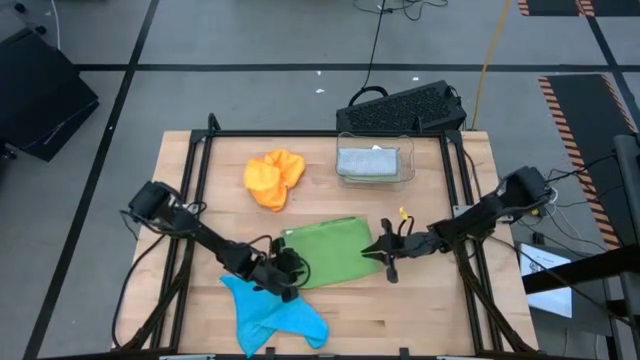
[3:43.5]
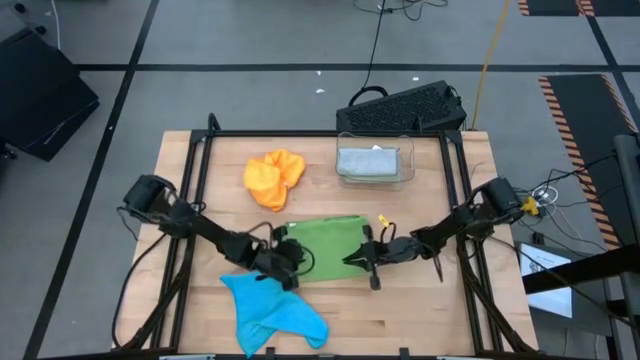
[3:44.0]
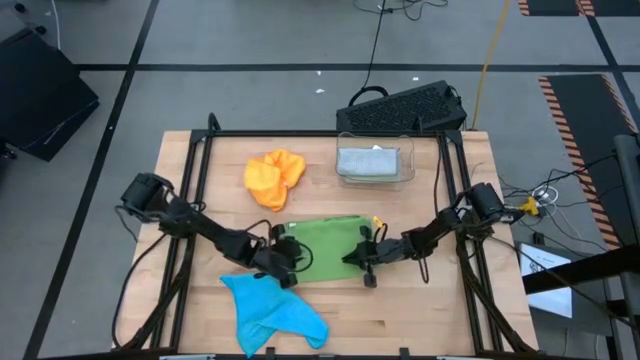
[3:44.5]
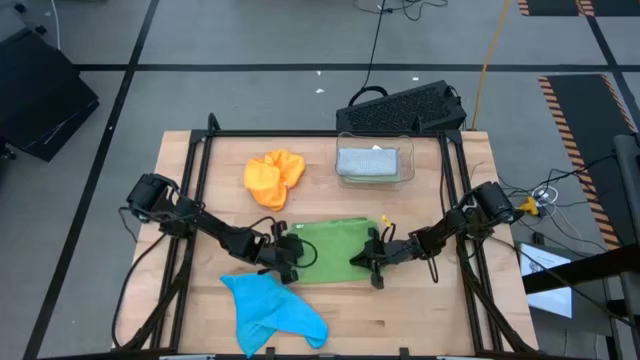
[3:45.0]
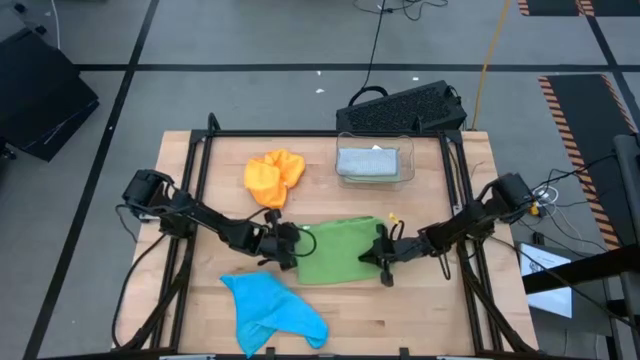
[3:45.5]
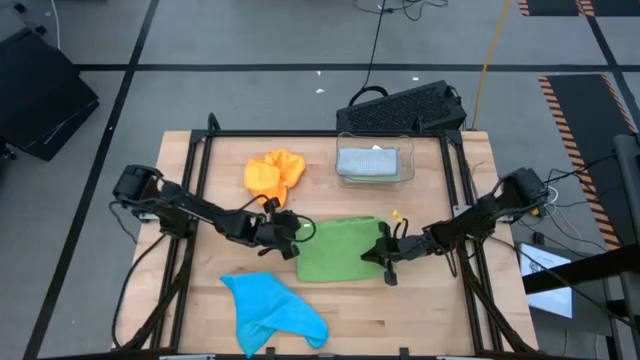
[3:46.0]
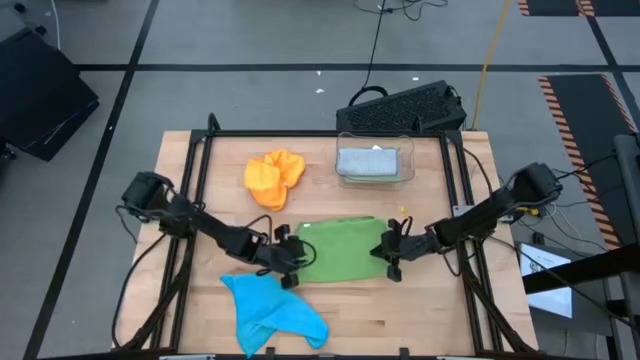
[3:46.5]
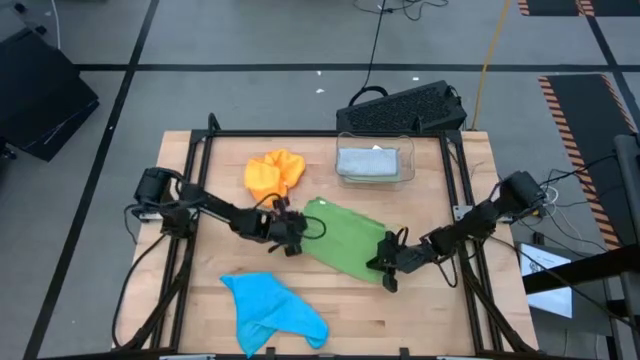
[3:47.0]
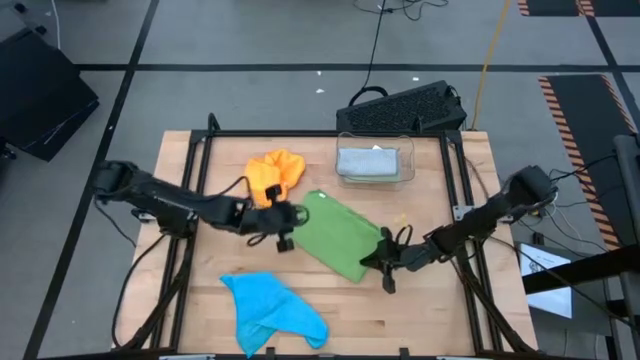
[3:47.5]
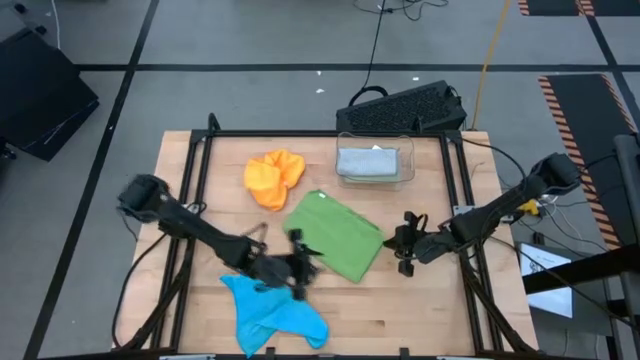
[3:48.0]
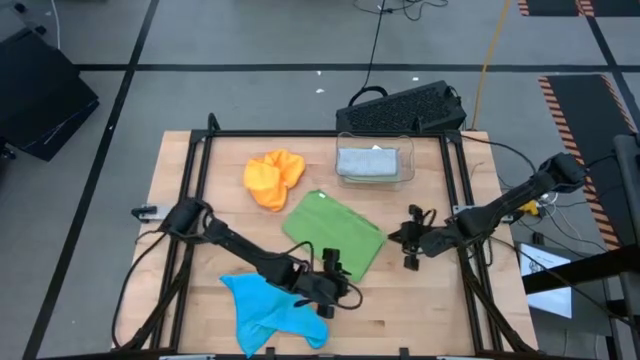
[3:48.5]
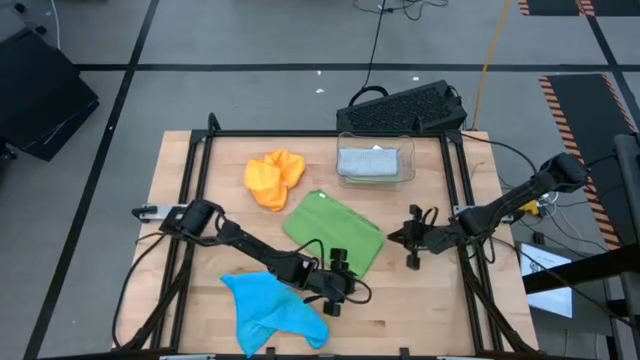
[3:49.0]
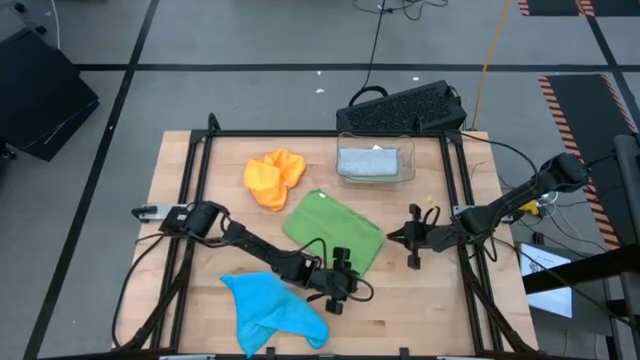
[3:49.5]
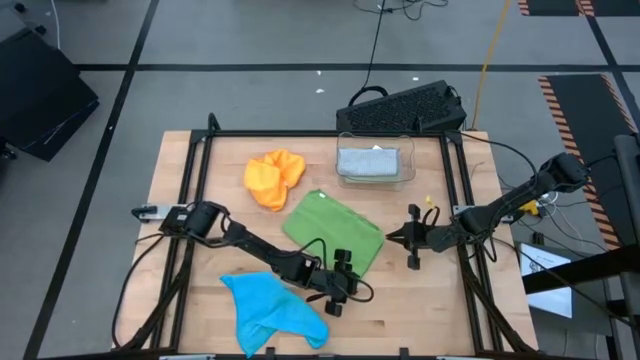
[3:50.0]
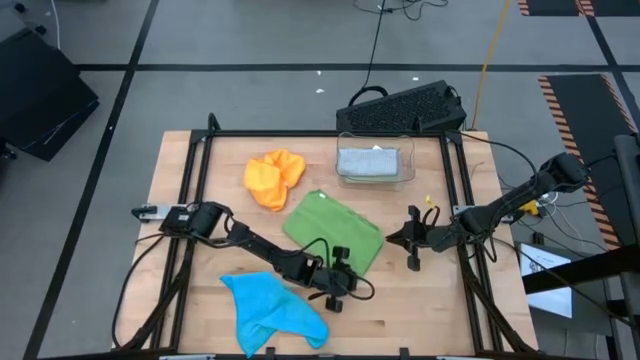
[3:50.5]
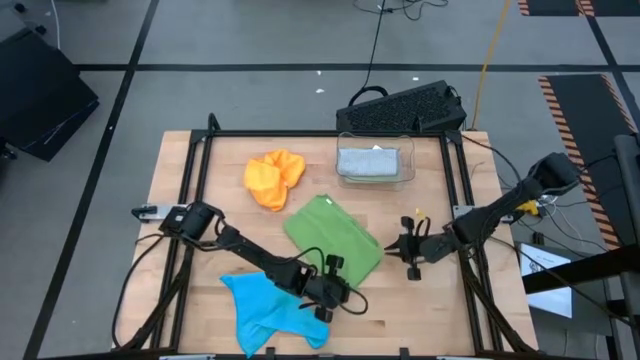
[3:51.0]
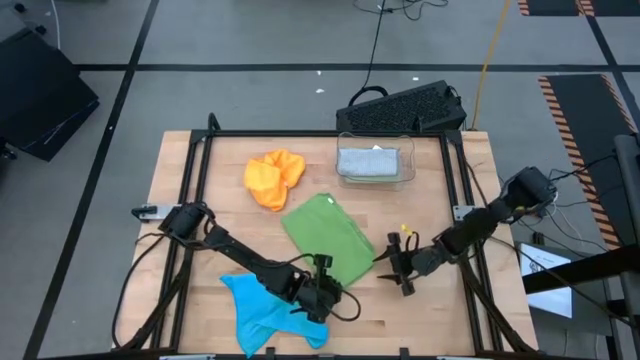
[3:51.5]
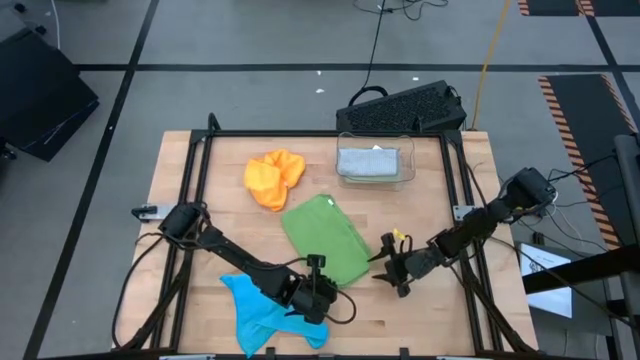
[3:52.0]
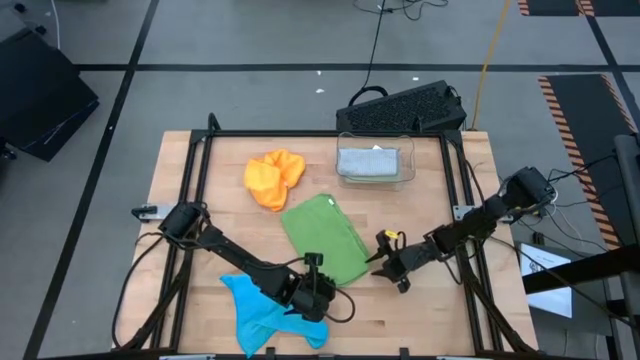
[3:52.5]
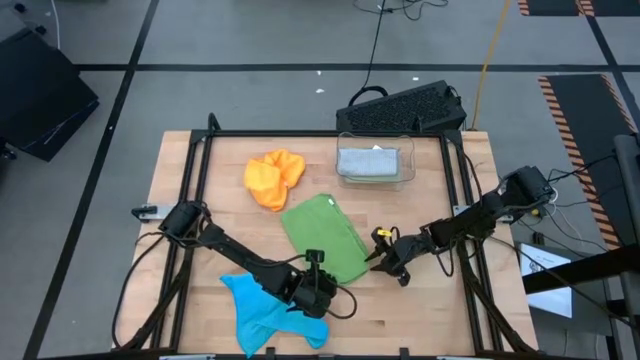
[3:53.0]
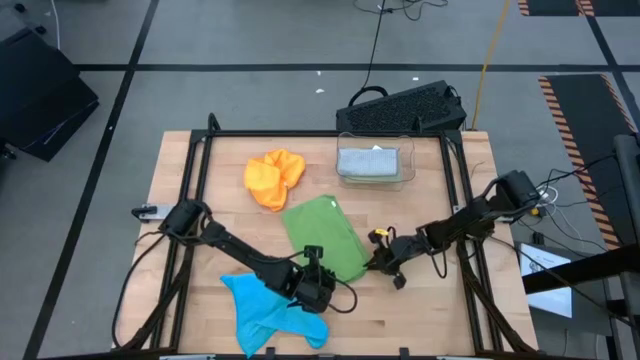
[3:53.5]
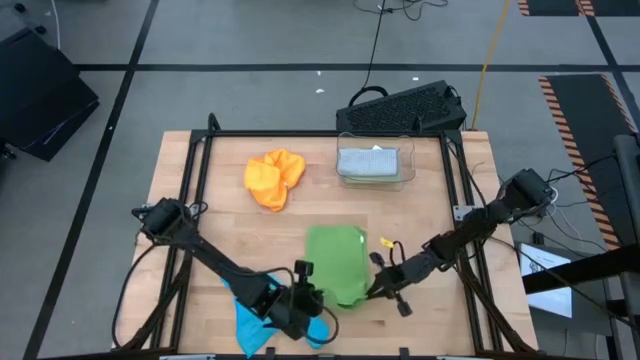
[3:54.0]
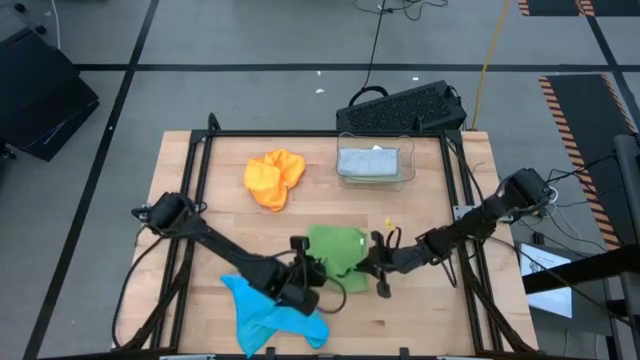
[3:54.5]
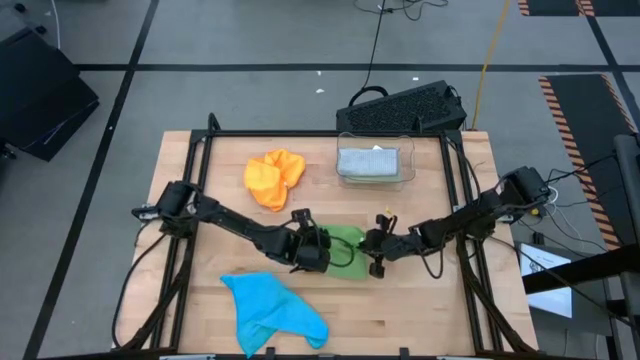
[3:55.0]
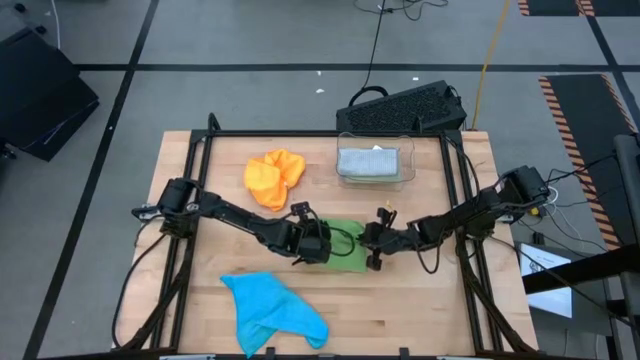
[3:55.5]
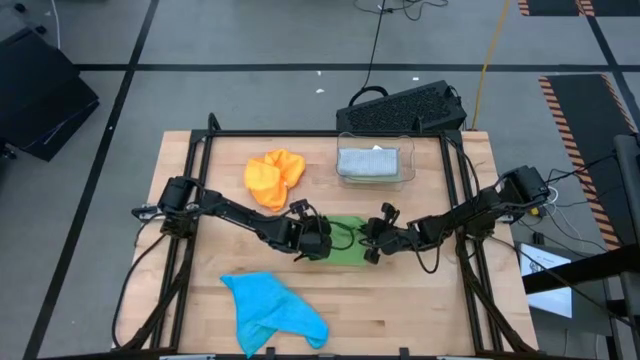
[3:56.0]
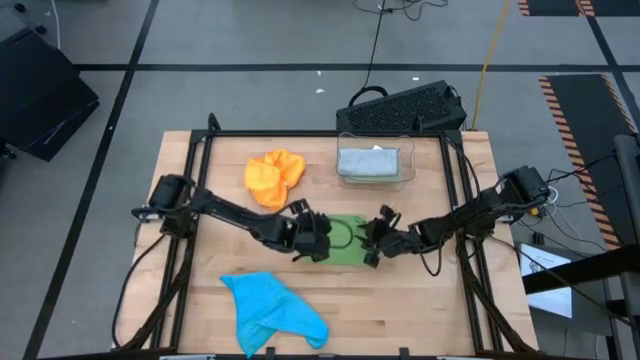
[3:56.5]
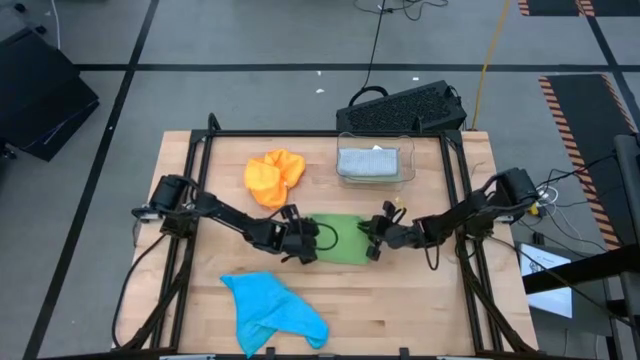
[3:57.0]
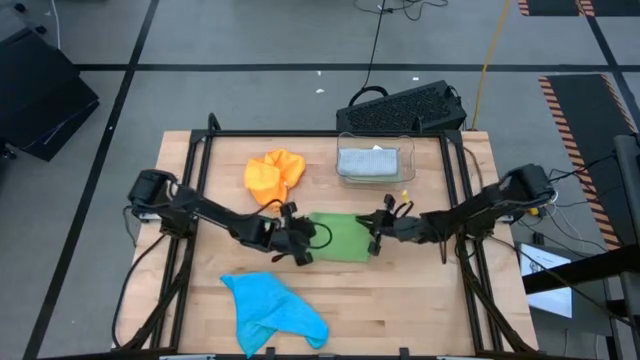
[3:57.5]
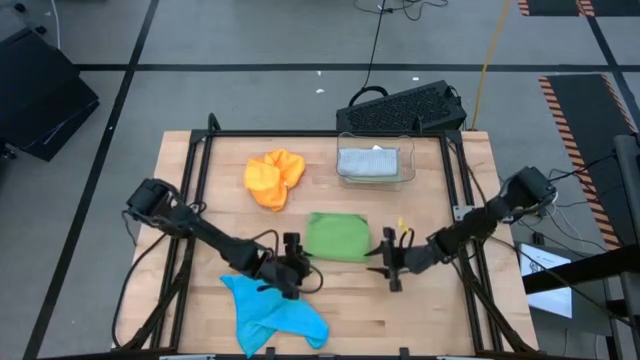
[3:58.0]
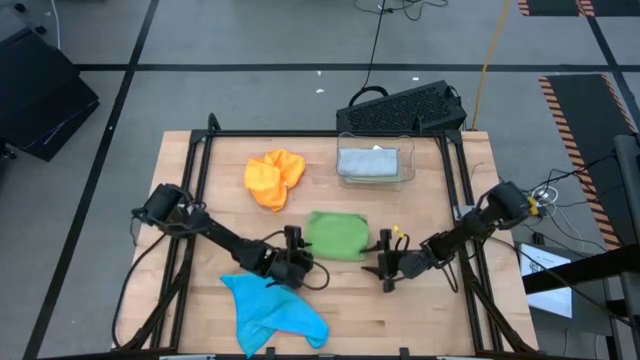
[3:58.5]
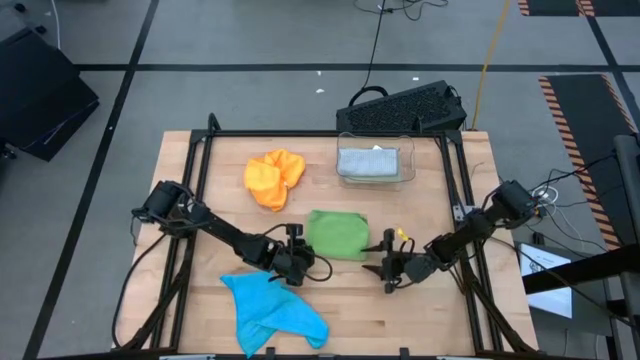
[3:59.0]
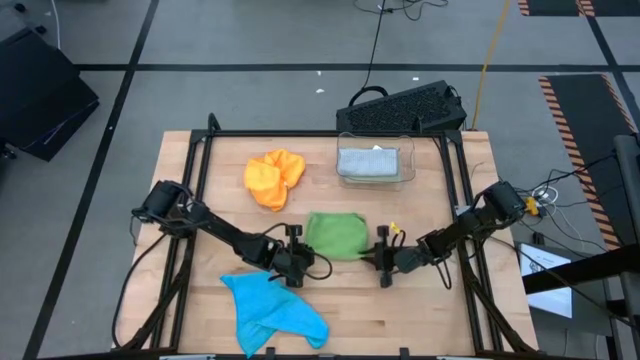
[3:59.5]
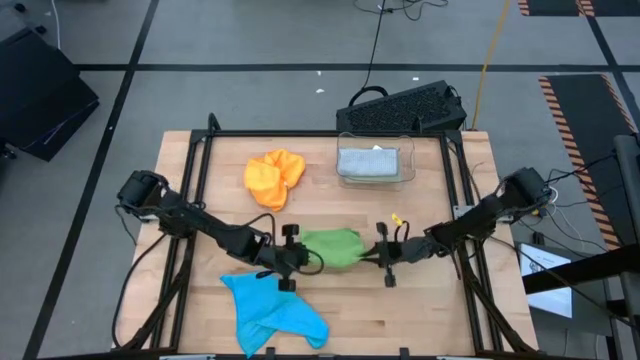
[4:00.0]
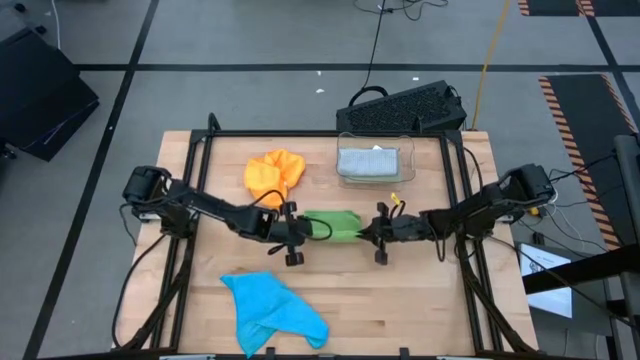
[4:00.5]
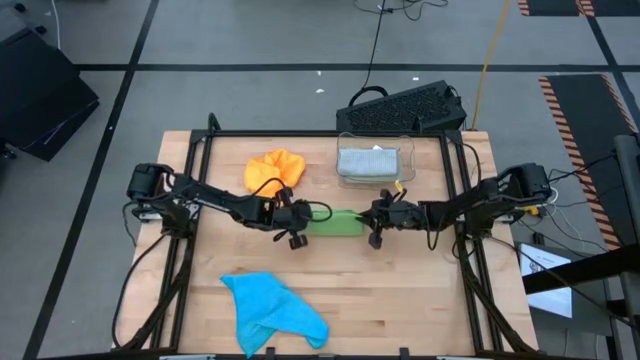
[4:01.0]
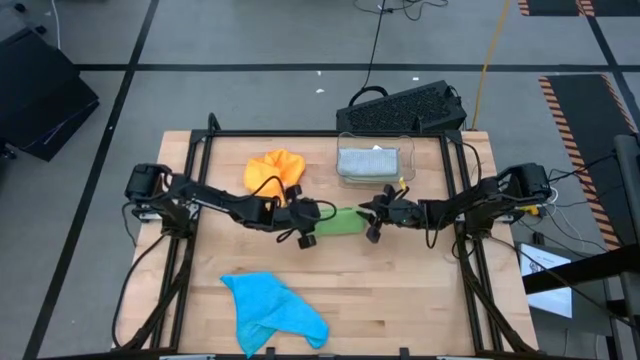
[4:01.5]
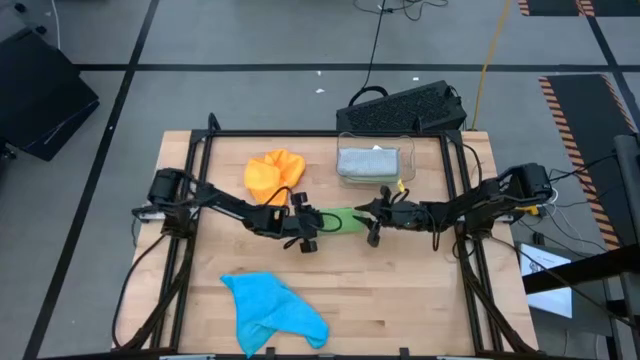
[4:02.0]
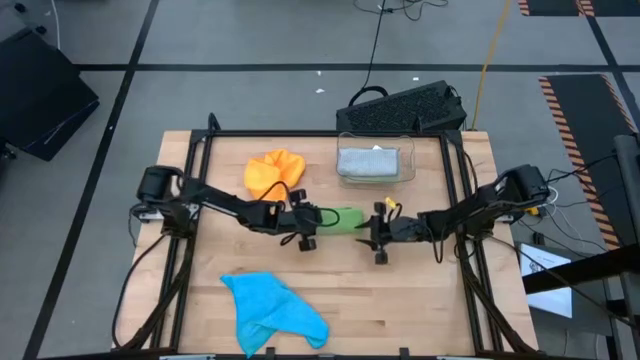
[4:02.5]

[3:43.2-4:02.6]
Task: Fold microfiber towels
Fold the green microfiber towel
